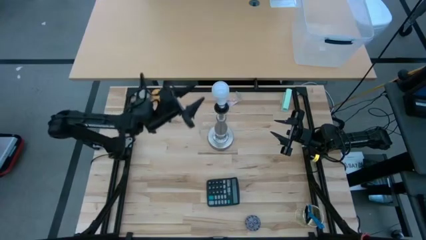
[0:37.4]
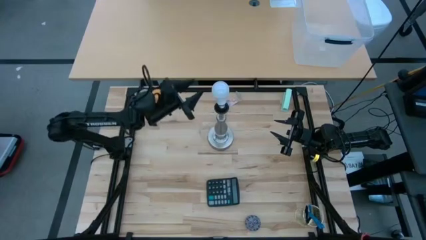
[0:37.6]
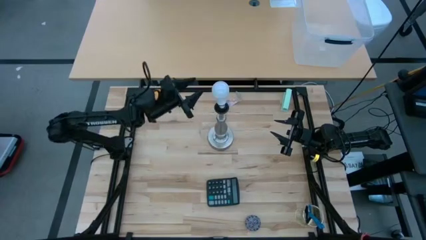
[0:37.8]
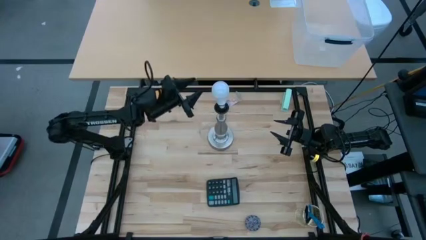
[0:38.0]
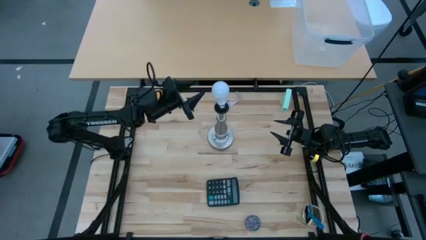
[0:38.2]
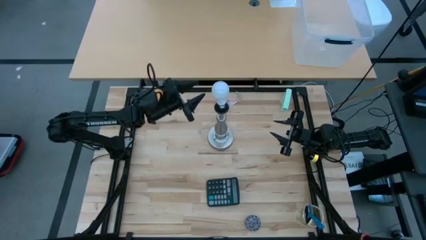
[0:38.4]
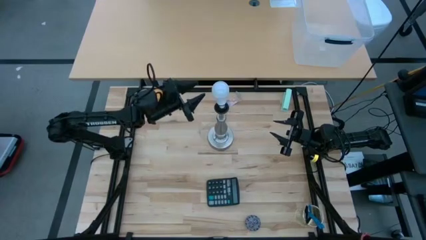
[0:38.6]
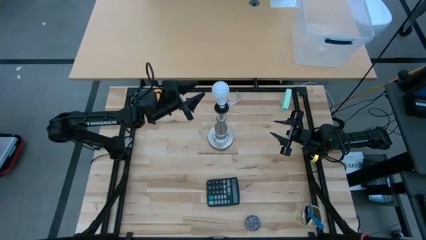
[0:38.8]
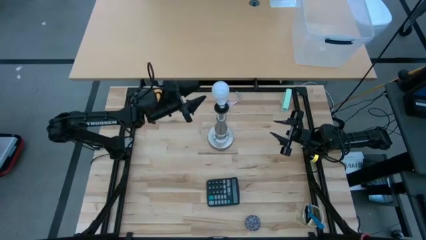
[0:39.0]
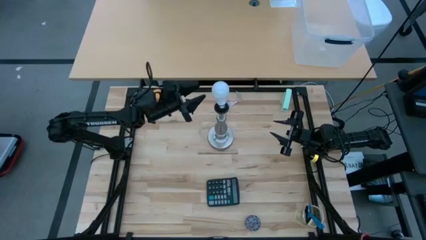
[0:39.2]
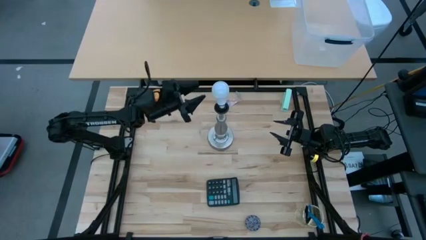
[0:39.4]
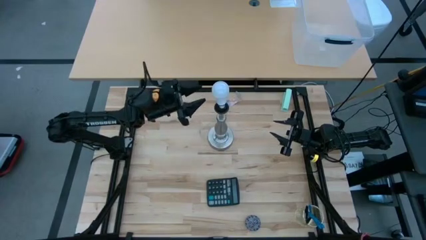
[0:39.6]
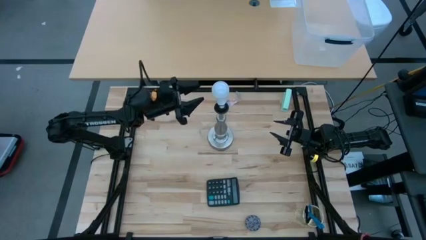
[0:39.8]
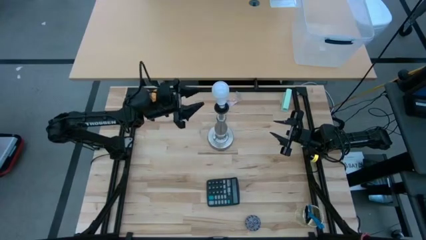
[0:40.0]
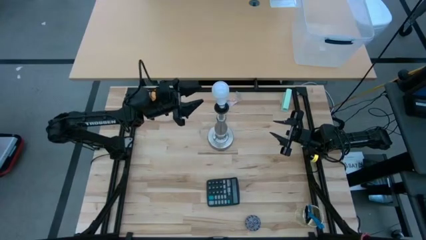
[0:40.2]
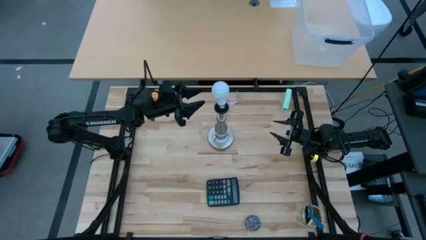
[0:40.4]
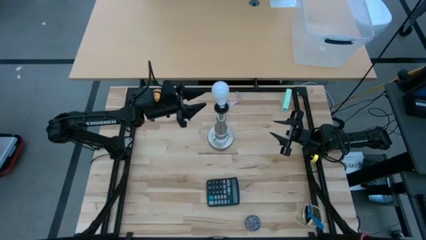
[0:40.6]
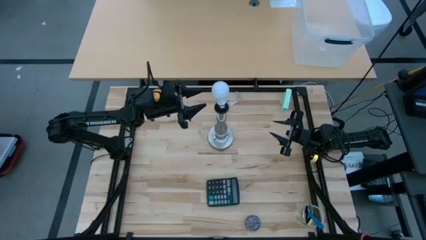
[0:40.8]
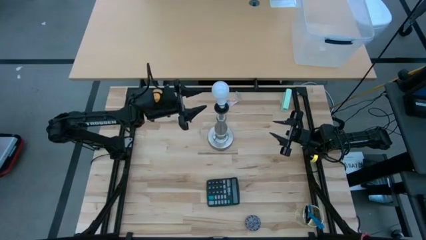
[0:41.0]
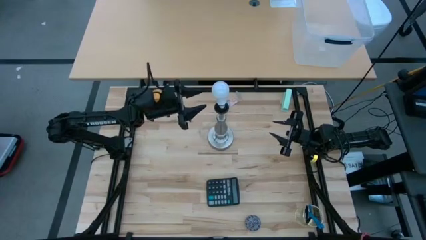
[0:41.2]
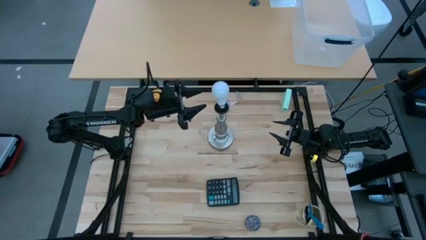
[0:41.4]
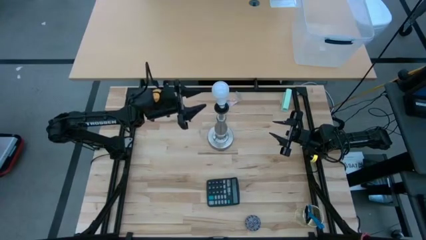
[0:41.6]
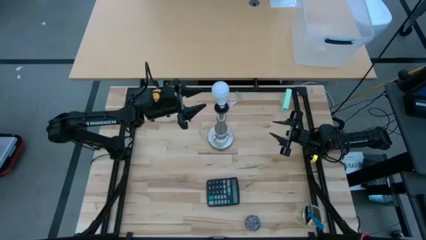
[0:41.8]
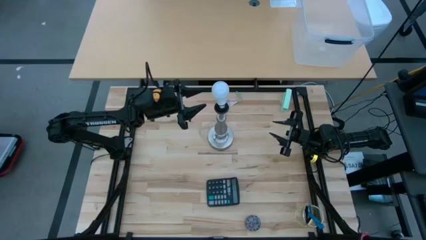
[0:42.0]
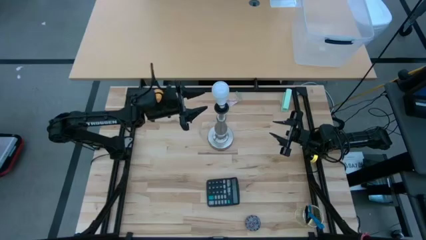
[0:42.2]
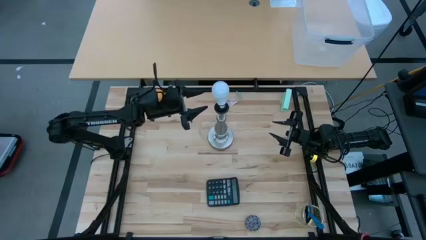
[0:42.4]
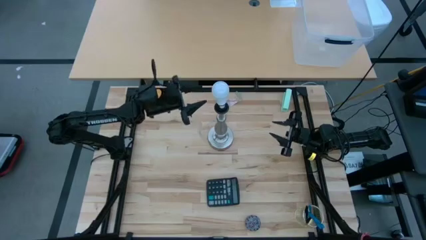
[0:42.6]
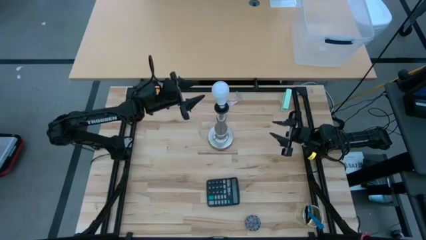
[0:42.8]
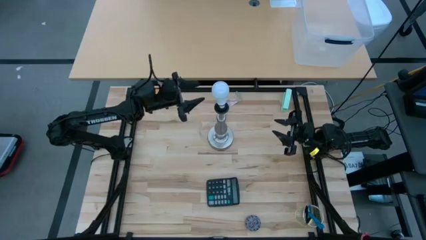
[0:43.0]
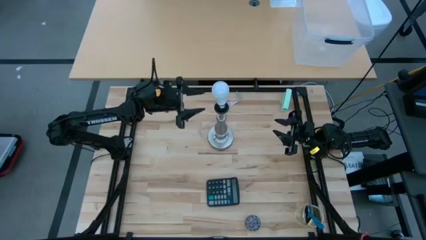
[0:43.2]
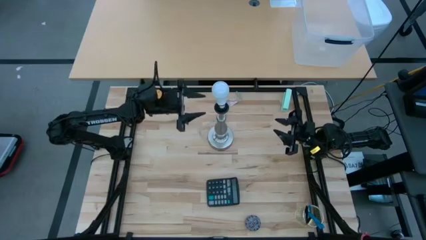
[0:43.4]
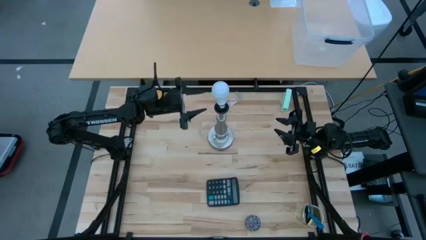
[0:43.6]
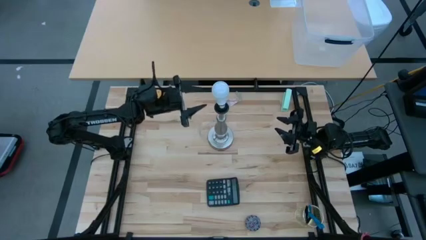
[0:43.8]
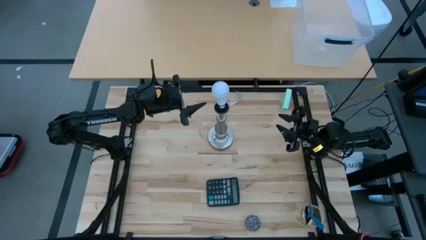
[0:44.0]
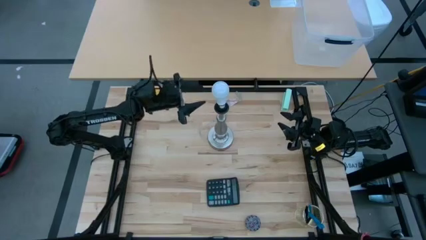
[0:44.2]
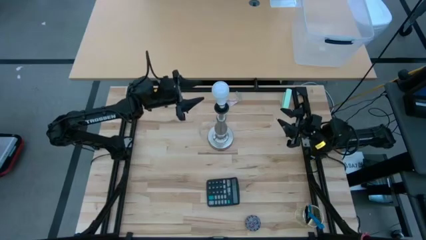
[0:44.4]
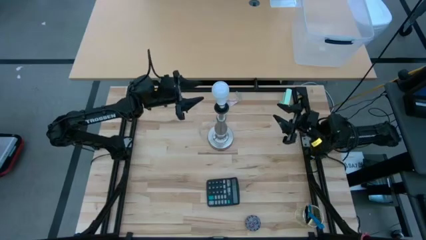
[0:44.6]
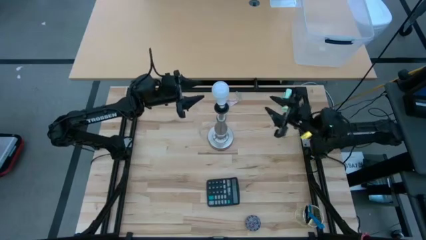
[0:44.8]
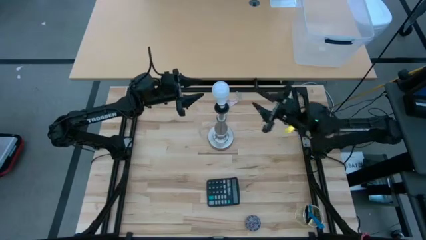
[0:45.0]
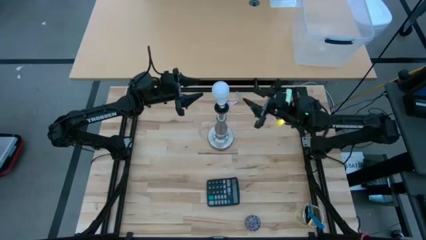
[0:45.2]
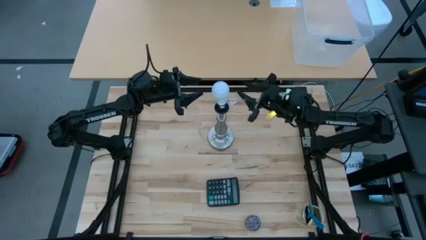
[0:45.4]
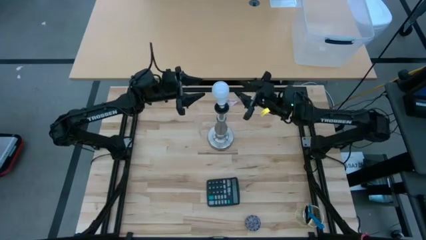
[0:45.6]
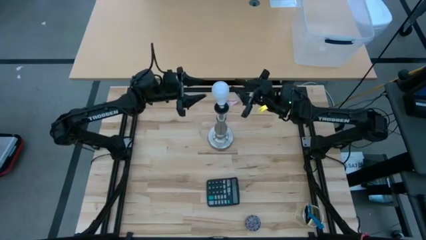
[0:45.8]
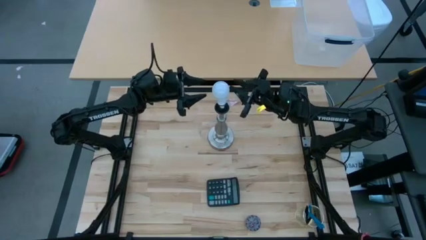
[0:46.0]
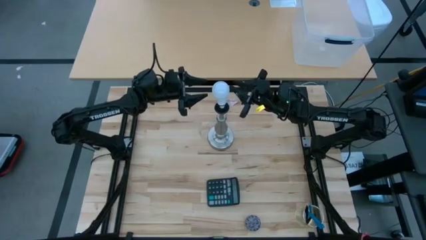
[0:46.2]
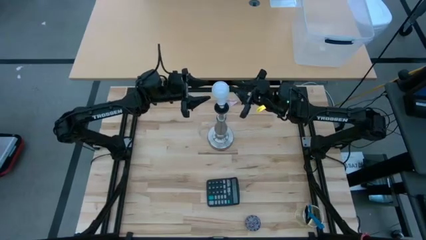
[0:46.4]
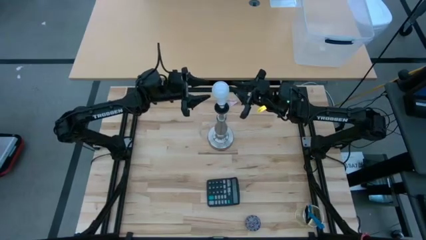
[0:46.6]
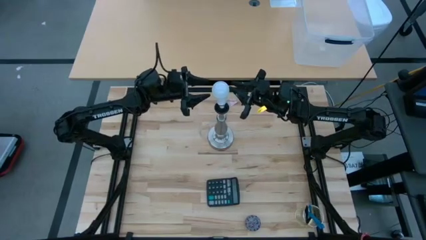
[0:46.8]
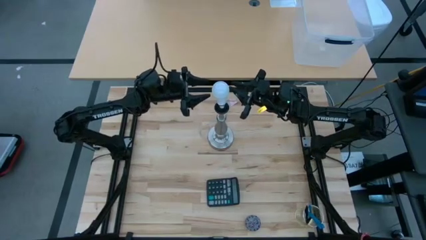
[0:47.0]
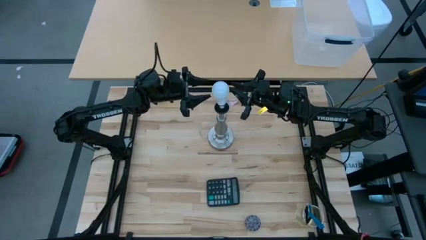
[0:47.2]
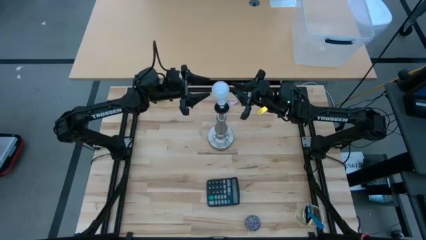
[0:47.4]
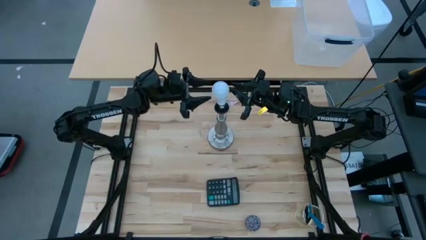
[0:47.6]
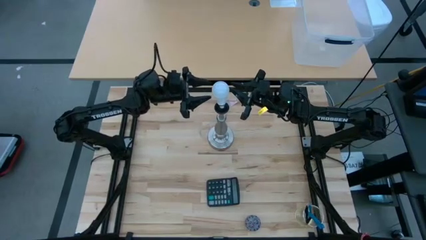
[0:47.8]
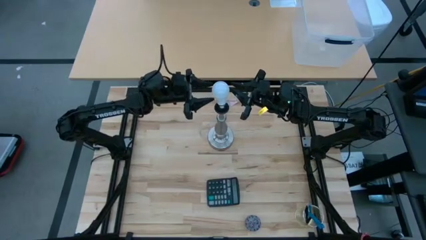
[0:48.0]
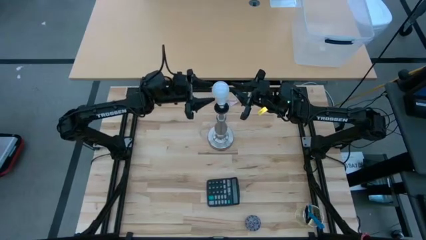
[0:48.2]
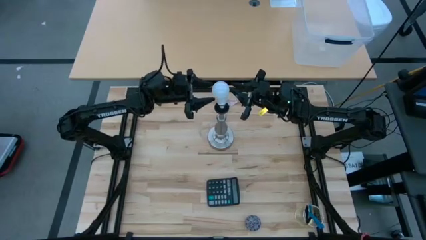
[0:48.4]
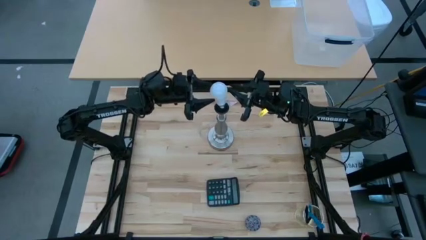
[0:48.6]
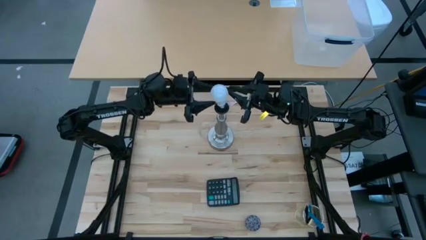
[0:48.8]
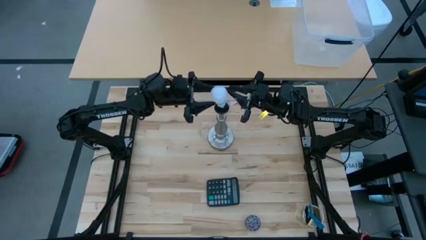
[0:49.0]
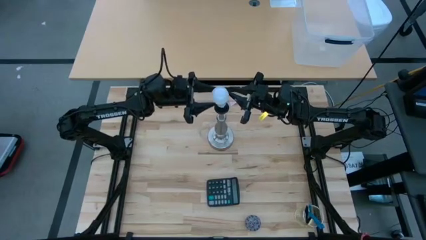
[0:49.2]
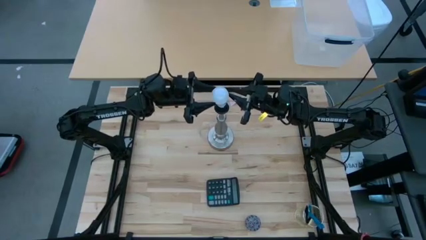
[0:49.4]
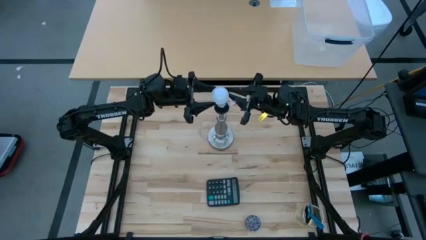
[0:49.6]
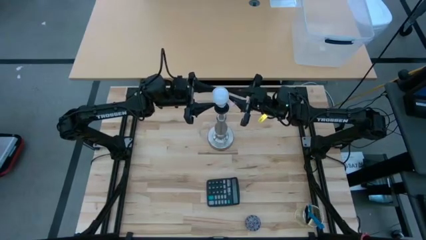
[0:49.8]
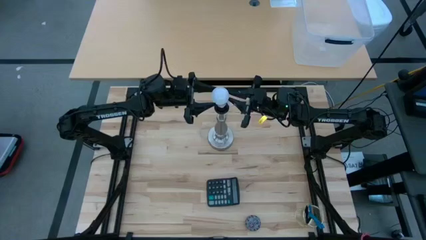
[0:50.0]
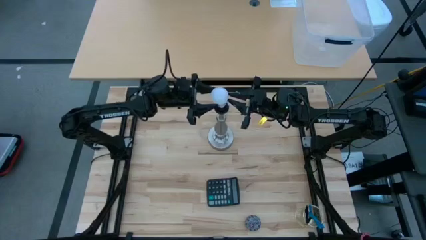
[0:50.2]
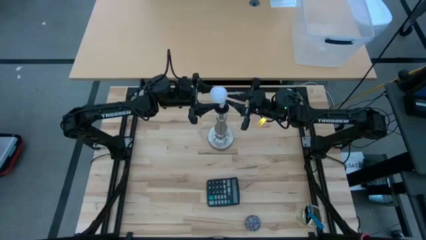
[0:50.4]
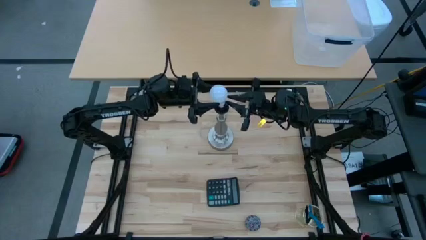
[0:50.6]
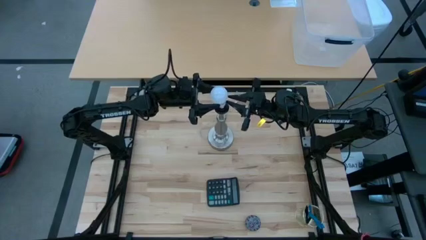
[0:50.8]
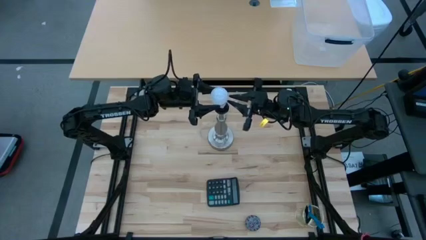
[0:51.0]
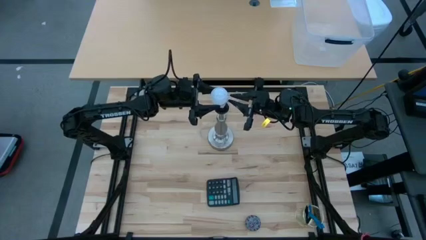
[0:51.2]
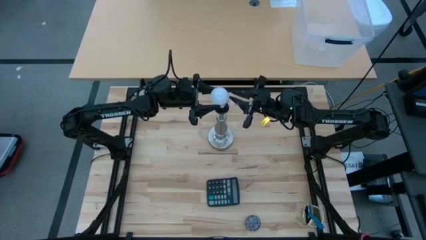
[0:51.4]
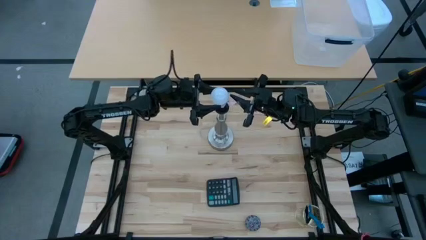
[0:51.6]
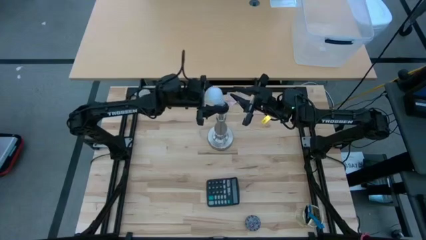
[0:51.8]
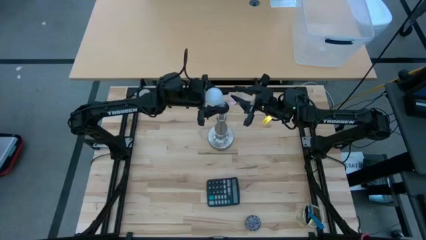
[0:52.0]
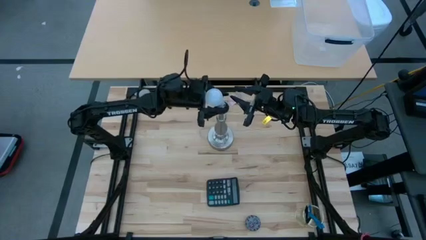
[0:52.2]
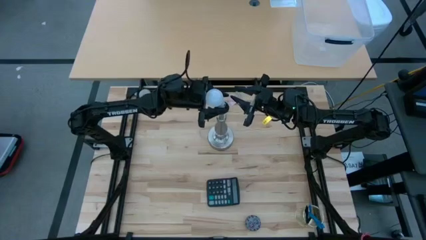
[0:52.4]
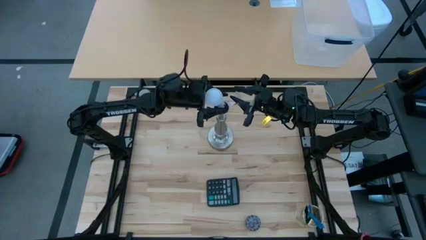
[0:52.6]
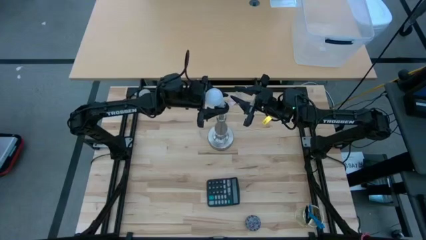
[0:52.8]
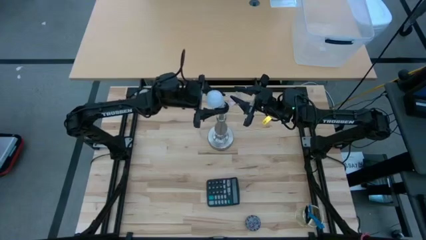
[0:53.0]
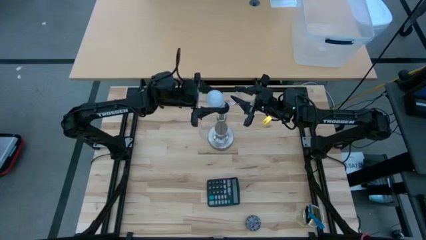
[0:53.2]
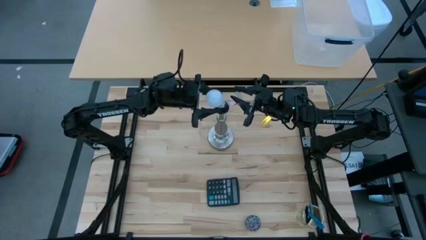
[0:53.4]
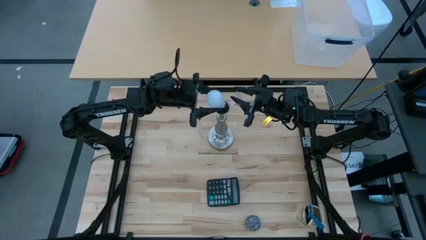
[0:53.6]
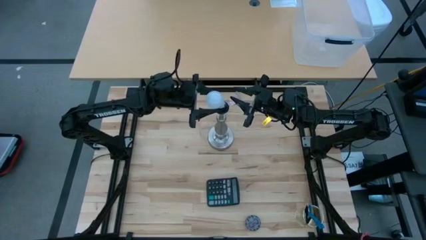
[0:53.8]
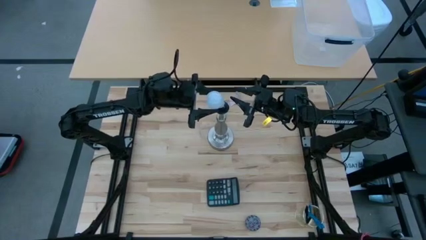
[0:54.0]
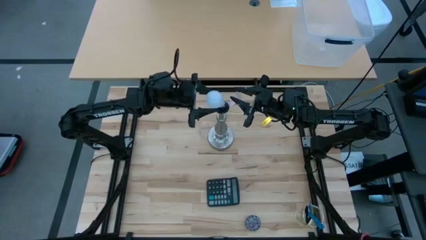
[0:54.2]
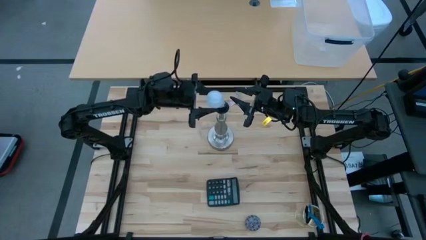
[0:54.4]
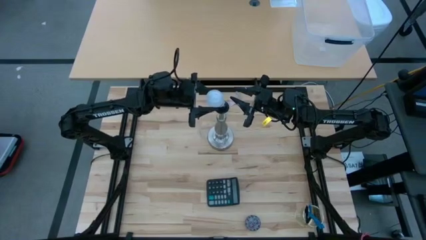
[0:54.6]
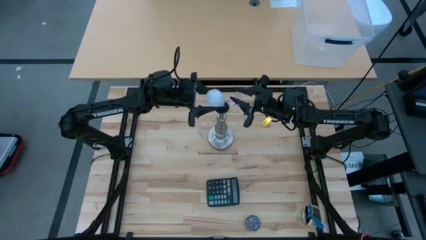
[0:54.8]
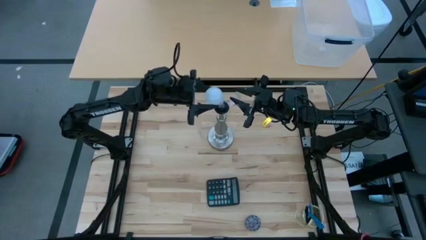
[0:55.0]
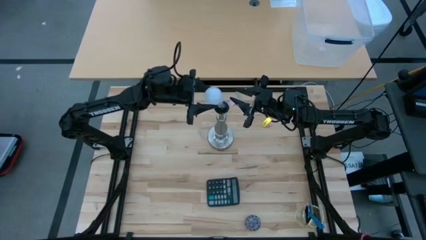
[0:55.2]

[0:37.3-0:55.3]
Task: Screw lightbulb
Insert the light bulb into the lamp
